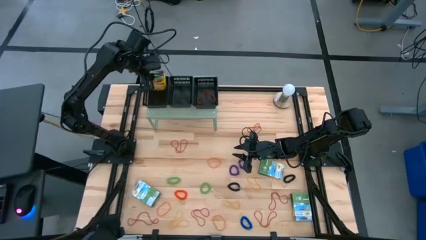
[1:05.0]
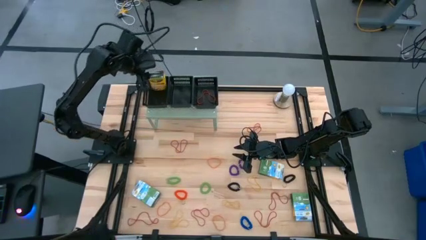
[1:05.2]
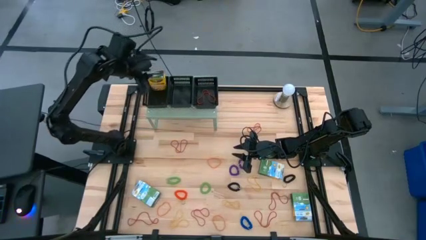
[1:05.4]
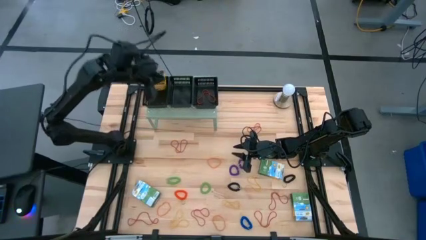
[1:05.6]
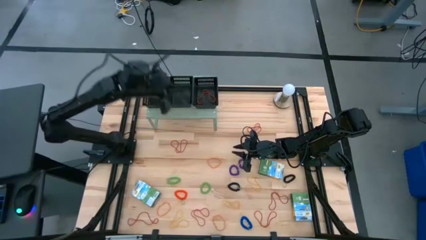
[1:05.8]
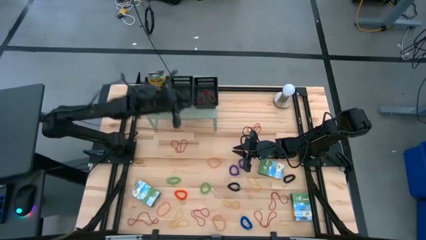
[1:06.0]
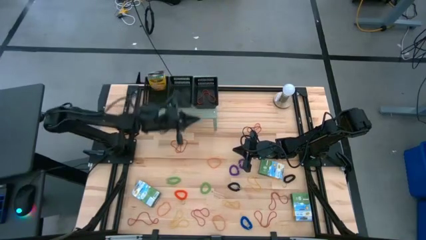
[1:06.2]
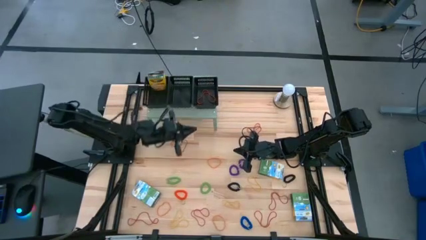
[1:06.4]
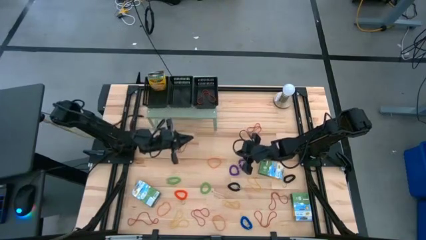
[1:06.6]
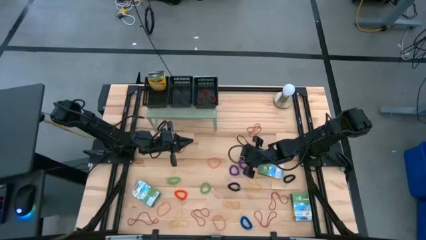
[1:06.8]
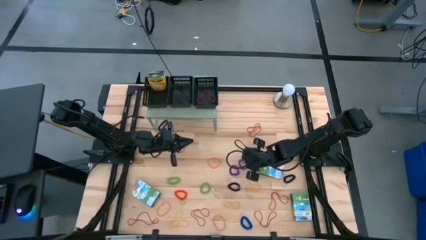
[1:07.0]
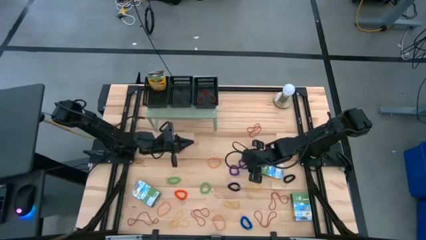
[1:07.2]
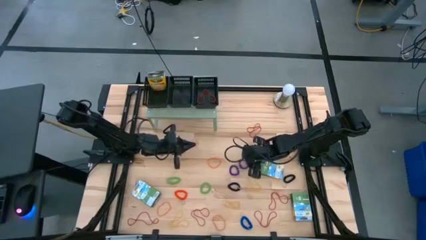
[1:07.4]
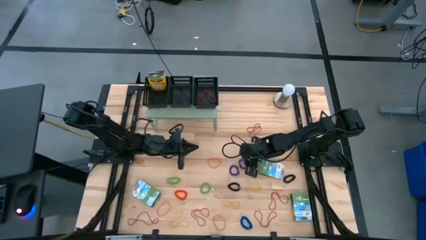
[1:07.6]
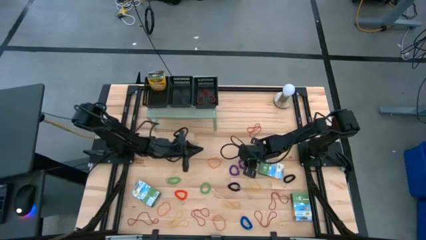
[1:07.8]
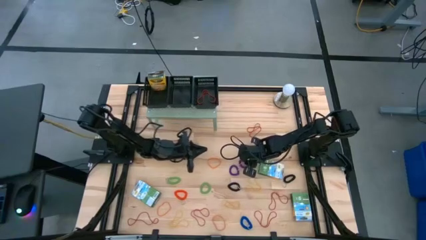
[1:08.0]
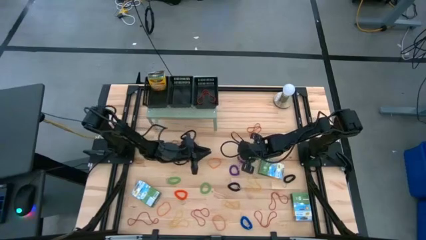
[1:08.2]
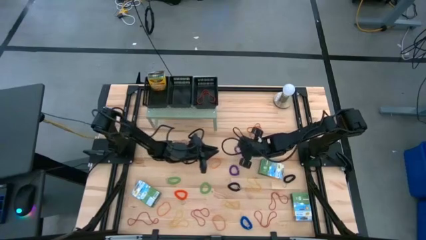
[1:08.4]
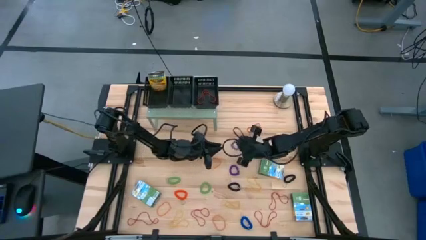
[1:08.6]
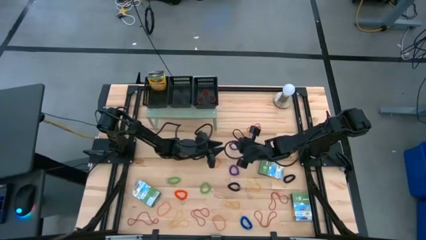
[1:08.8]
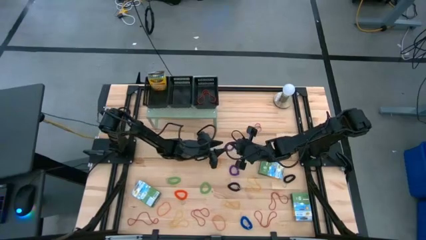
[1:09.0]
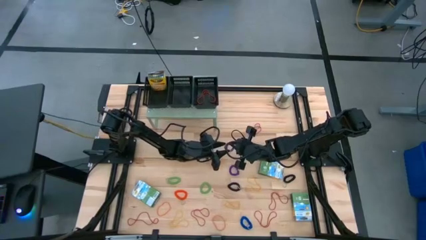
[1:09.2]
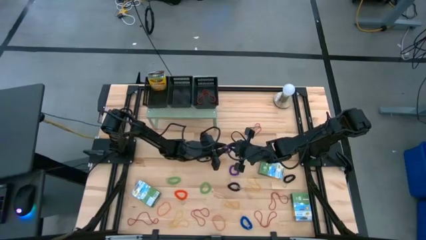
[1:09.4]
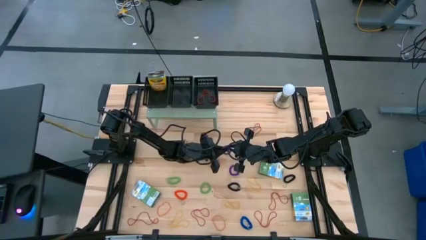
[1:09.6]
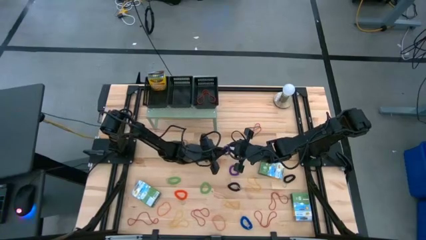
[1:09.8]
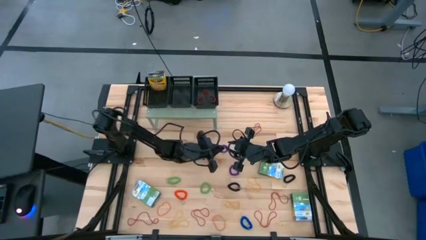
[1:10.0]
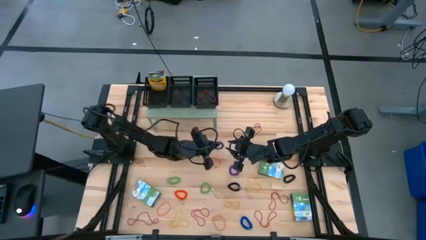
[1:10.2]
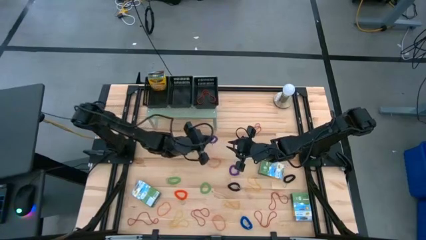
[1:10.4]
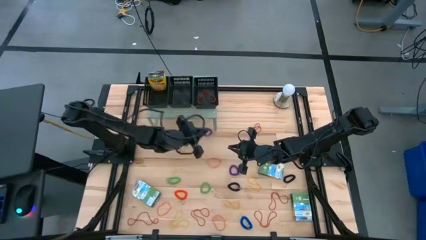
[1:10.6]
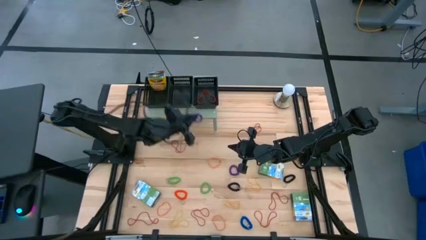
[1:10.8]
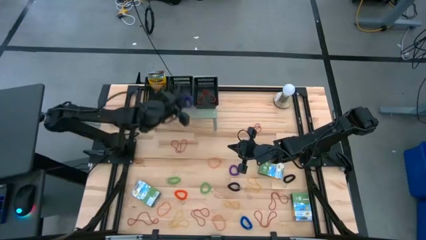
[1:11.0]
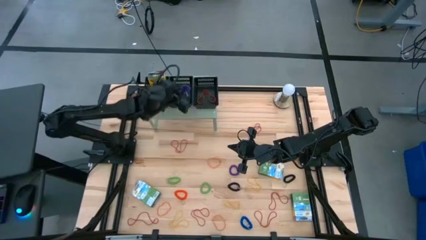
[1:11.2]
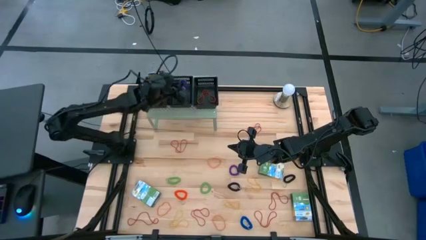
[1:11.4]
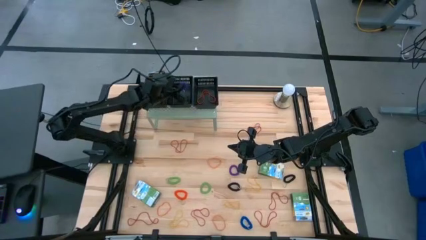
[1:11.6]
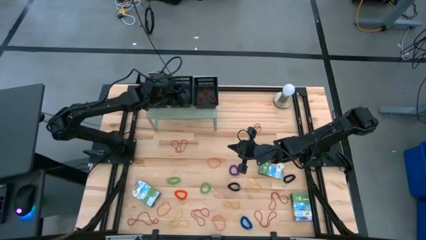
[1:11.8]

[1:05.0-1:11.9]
Task: Pick & Place Office Desk Supplies
Put the purple spring keychain into the middle black bin on the shelf

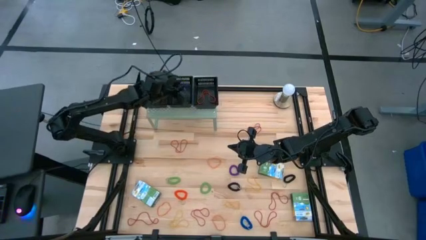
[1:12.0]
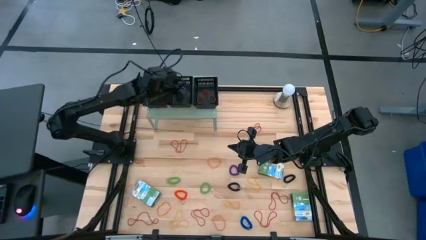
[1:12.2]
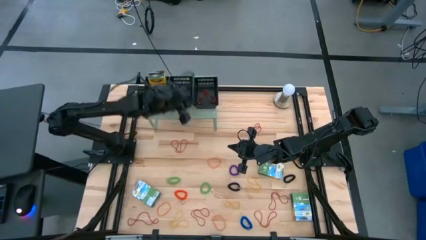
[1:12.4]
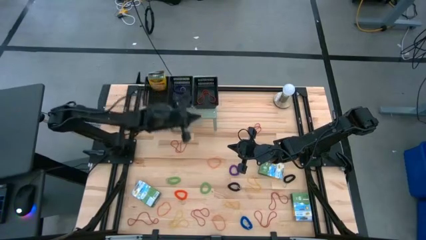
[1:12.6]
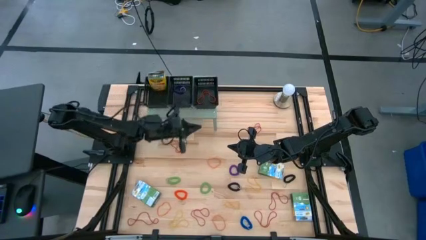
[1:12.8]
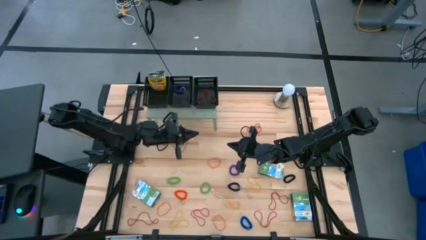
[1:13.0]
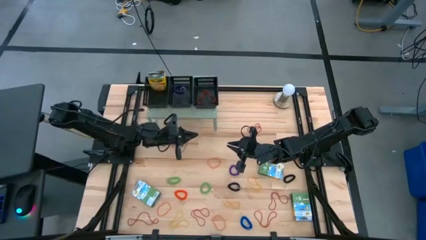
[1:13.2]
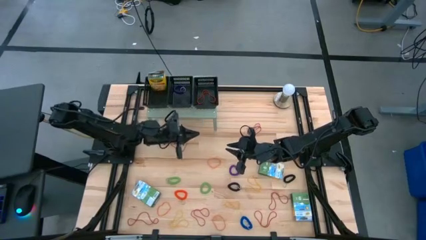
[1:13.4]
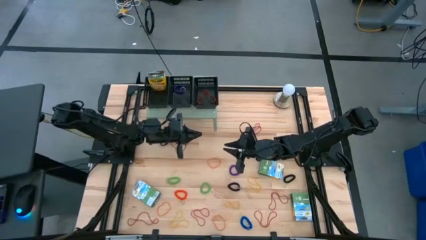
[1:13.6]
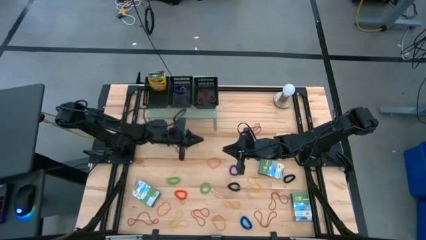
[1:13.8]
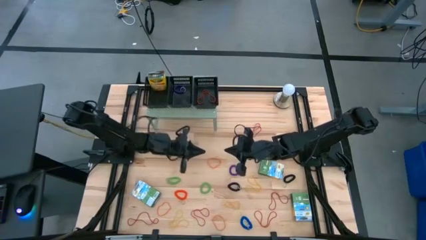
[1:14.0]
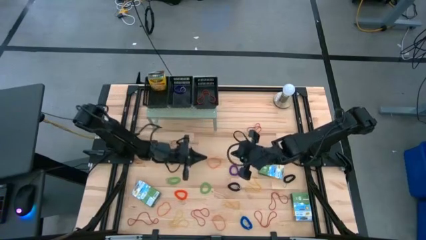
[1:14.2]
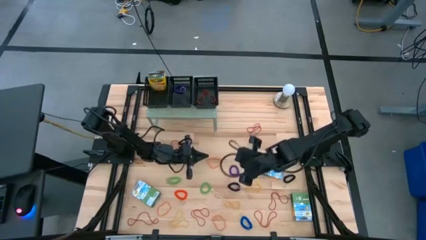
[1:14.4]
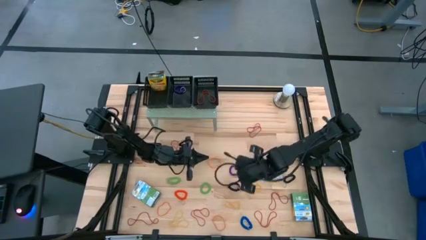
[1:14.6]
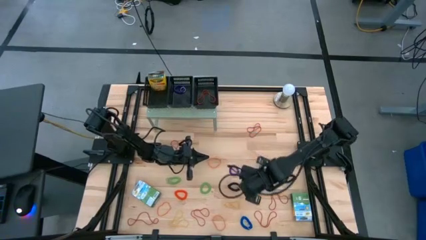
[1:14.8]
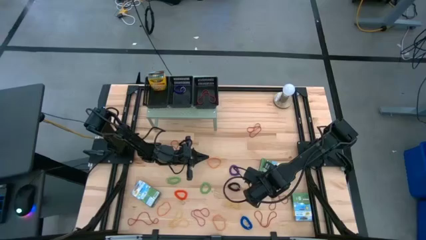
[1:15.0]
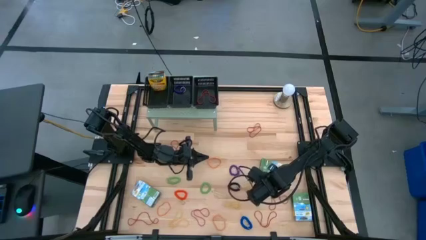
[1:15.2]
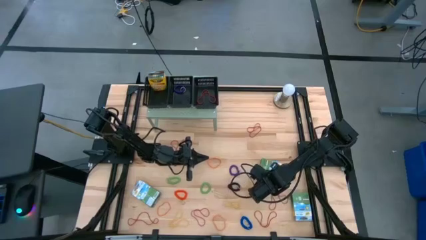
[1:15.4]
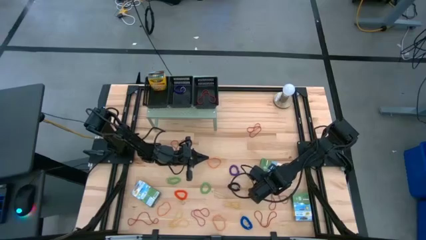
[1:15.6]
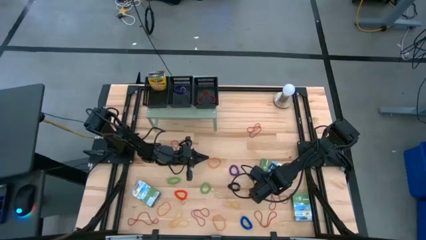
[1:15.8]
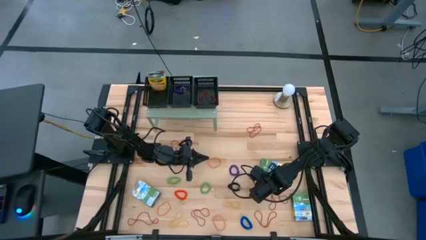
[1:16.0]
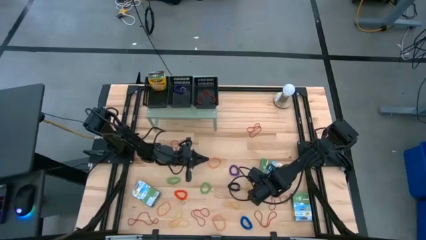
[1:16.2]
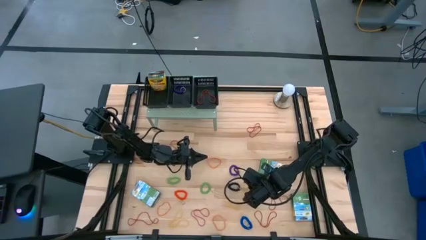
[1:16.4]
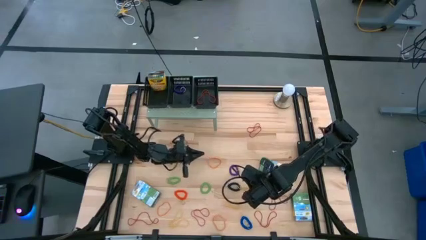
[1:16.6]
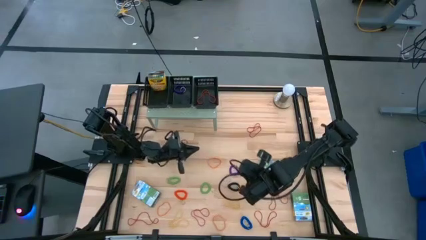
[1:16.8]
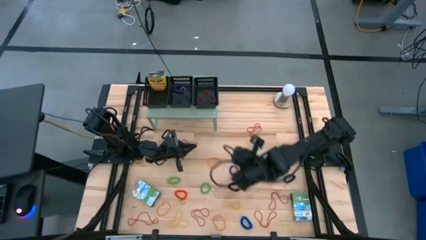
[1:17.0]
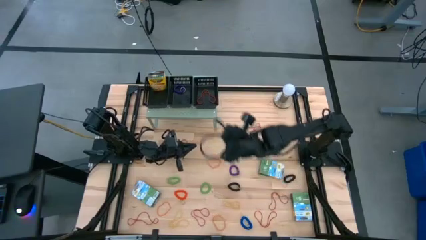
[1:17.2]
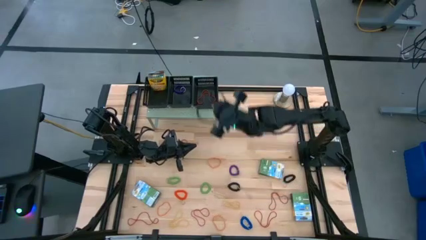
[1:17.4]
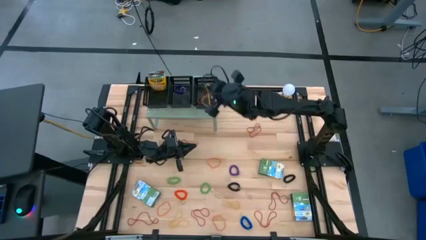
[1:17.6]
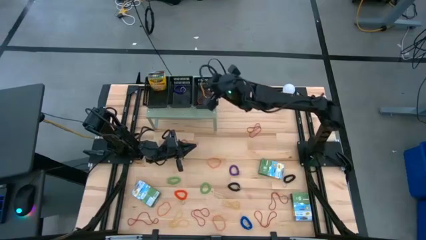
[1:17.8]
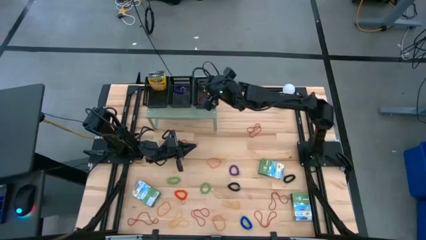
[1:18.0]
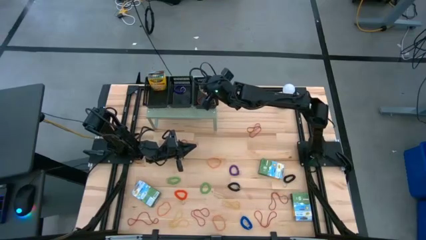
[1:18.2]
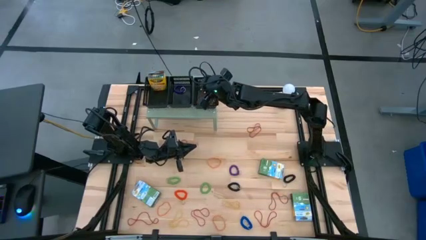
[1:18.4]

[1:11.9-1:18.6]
Put the yellow rubber band into the right black bin on the shelf

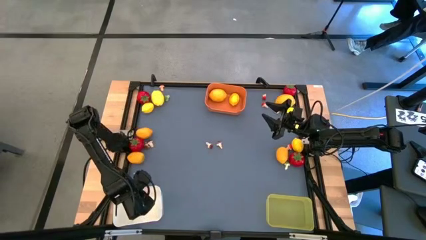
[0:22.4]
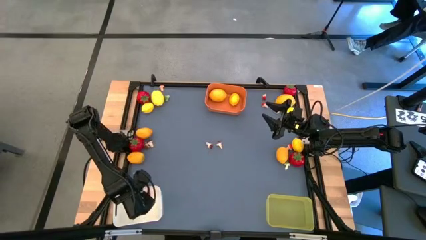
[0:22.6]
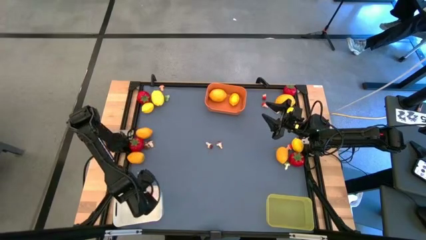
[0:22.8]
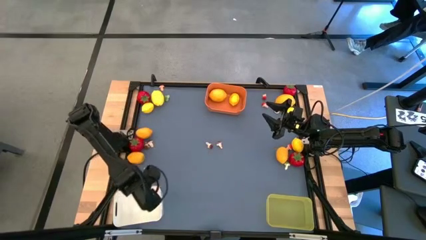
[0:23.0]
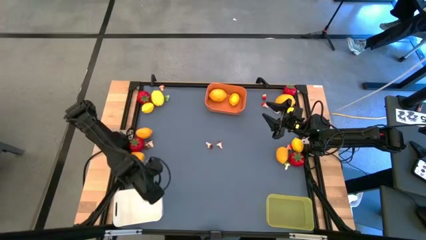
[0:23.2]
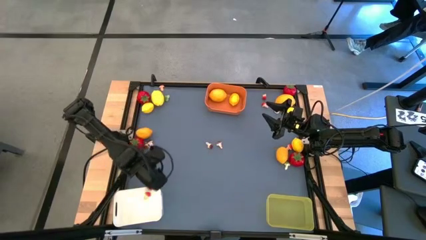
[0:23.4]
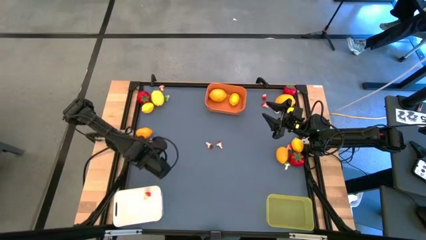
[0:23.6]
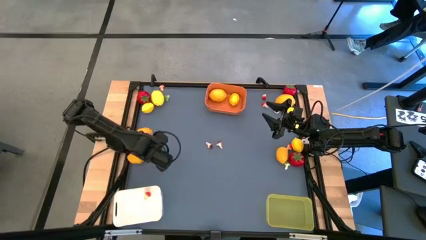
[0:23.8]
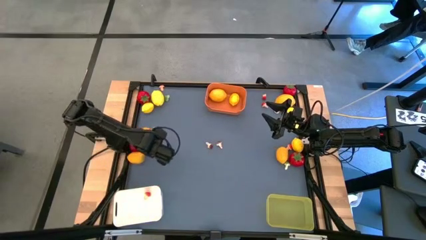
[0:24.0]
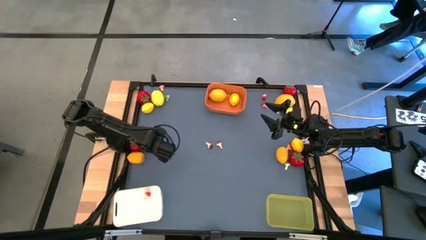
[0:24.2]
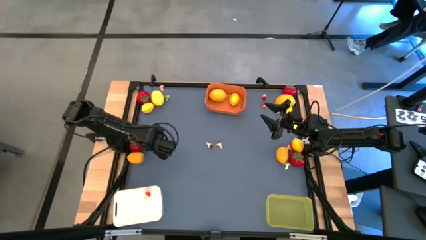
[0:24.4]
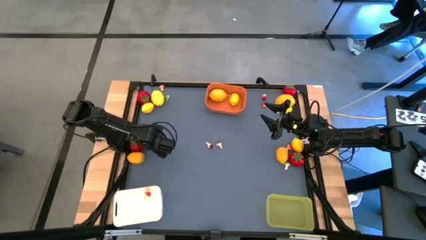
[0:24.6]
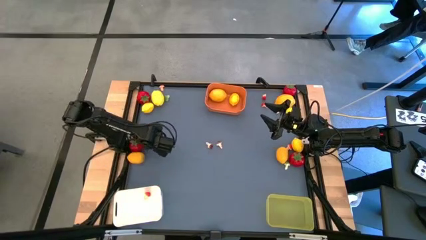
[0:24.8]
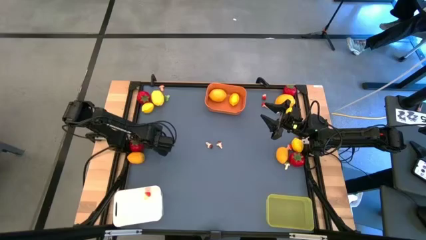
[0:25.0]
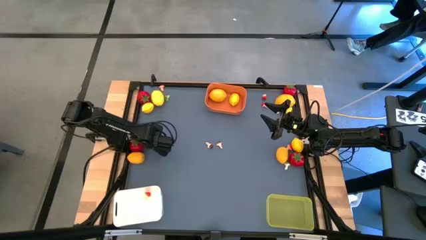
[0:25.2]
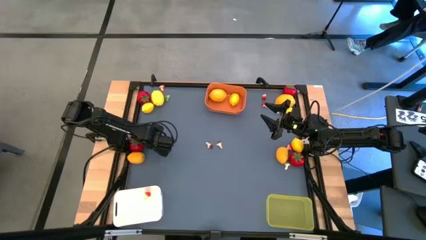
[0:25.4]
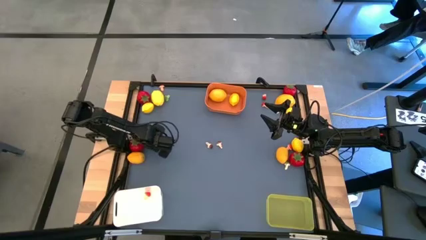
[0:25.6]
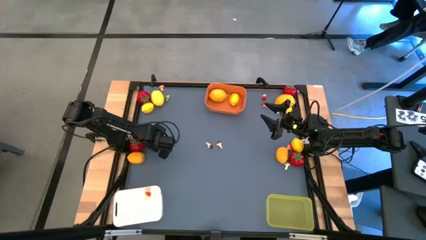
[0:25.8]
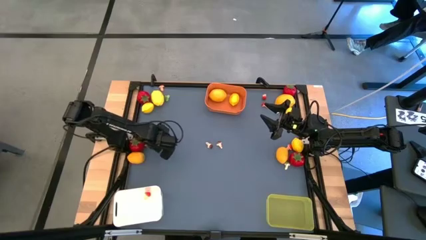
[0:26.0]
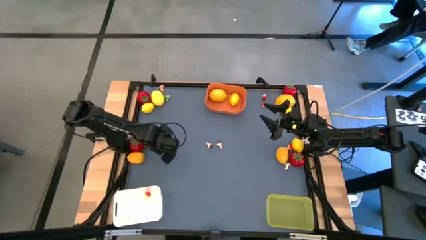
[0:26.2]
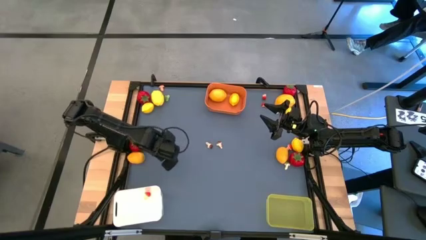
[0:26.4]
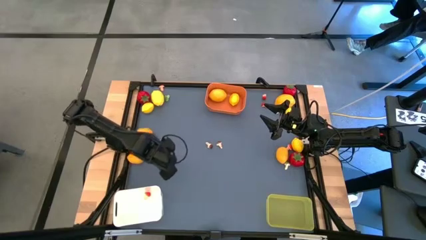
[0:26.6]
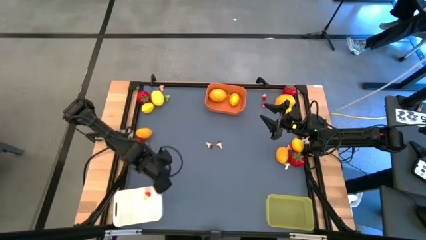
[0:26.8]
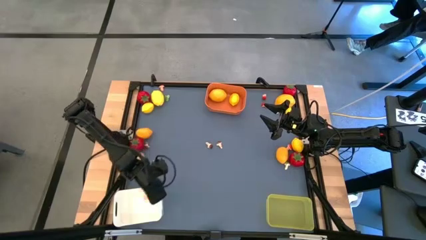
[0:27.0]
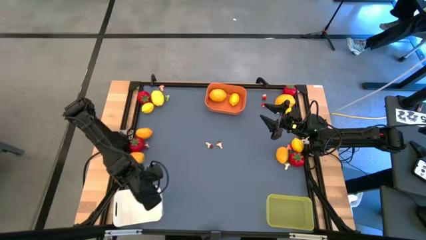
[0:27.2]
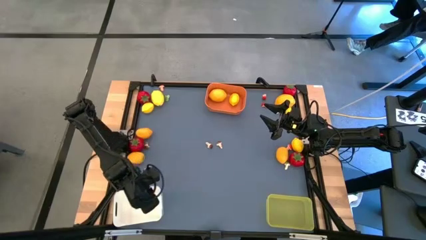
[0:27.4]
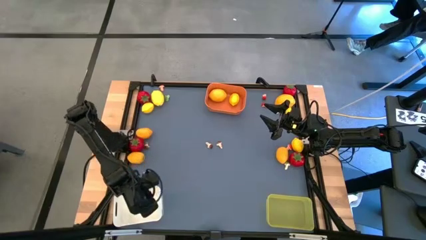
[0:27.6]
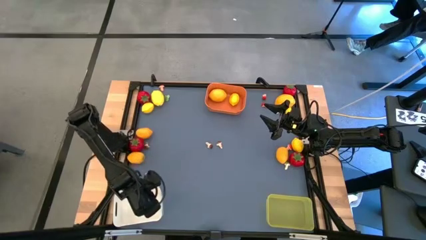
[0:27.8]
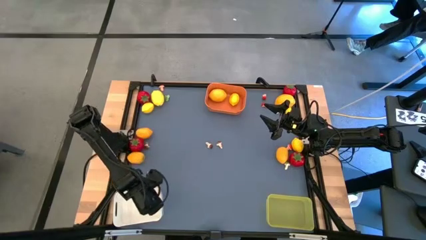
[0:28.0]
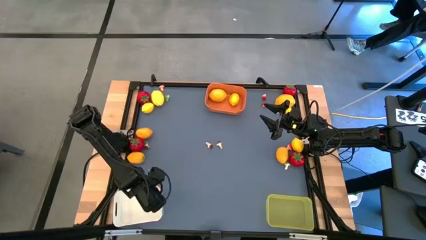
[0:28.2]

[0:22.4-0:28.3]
Task: Sort produce into baskets
Put the brown mushroom into the white bin
